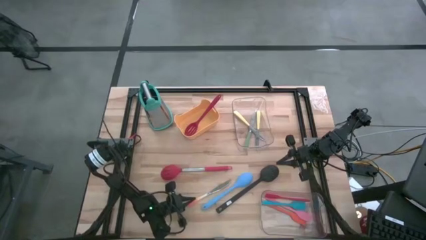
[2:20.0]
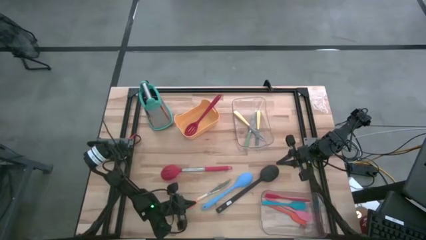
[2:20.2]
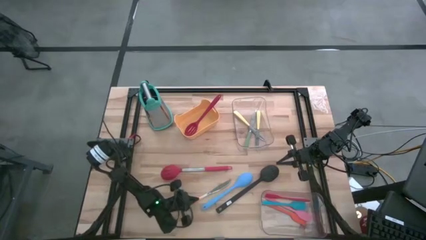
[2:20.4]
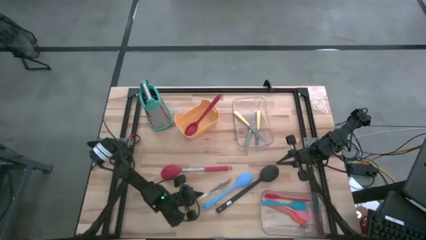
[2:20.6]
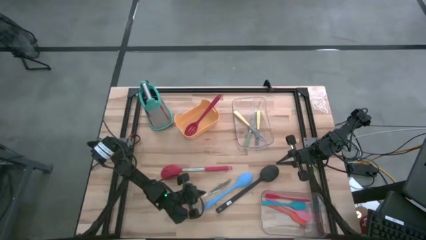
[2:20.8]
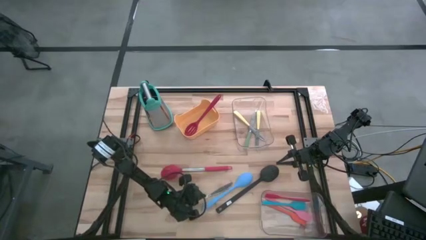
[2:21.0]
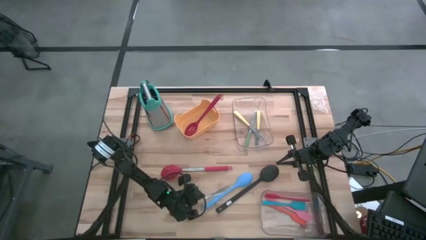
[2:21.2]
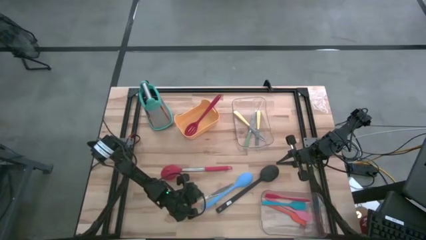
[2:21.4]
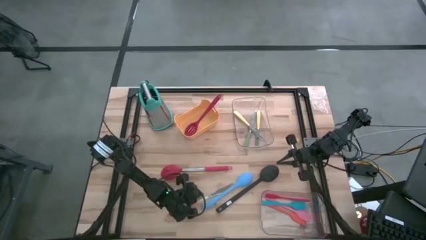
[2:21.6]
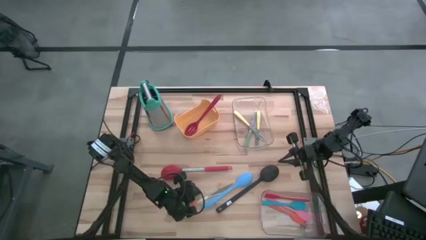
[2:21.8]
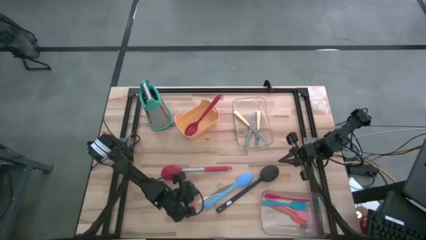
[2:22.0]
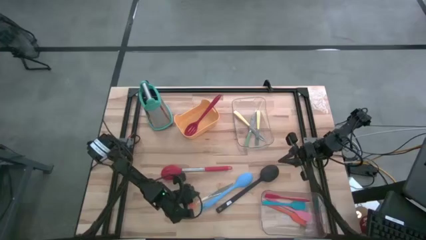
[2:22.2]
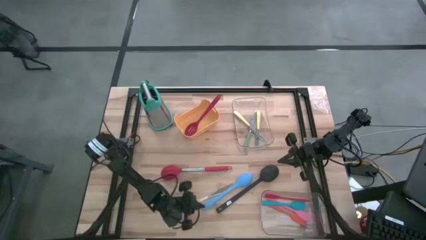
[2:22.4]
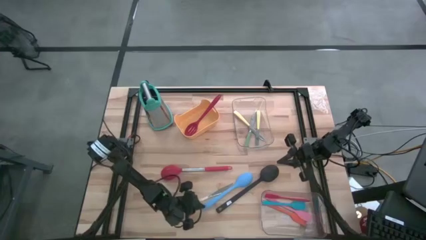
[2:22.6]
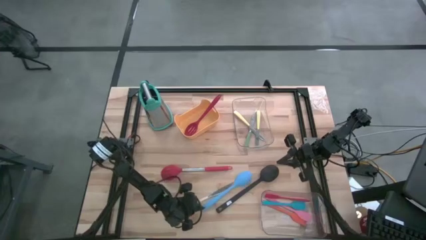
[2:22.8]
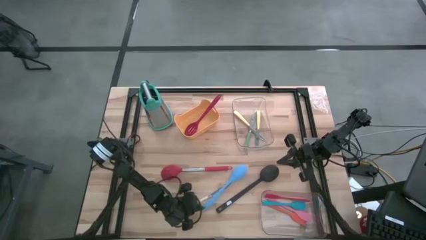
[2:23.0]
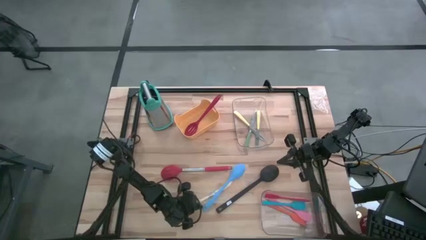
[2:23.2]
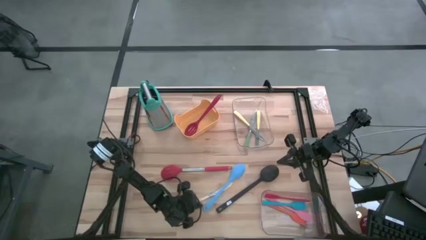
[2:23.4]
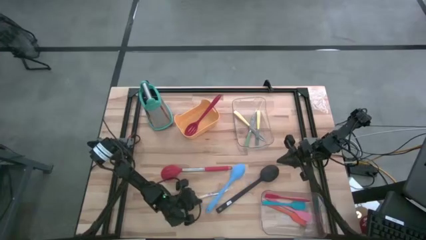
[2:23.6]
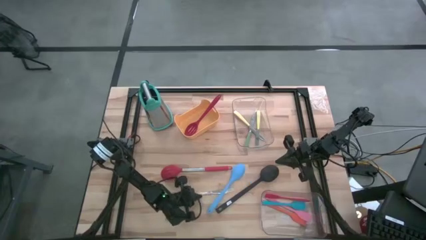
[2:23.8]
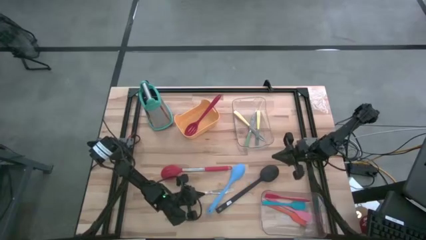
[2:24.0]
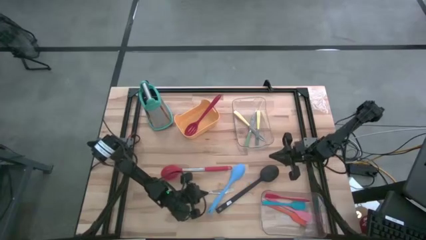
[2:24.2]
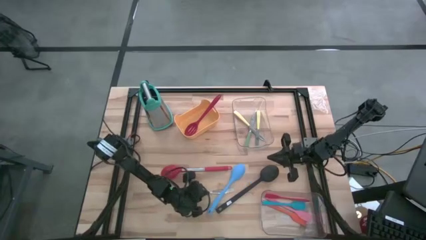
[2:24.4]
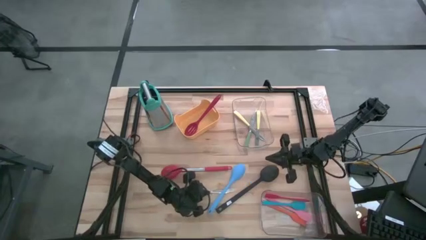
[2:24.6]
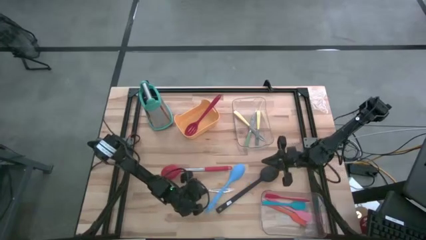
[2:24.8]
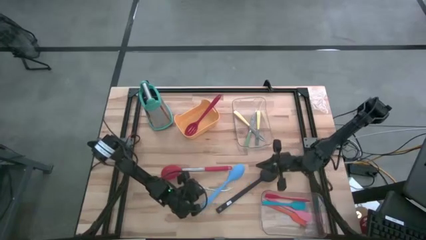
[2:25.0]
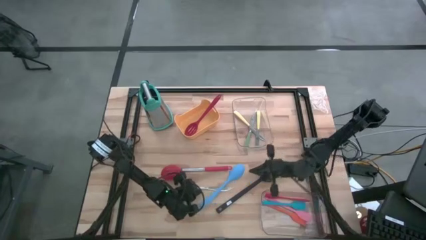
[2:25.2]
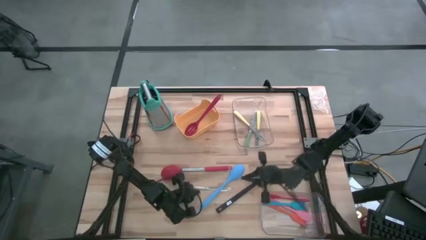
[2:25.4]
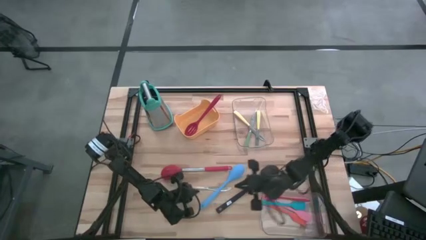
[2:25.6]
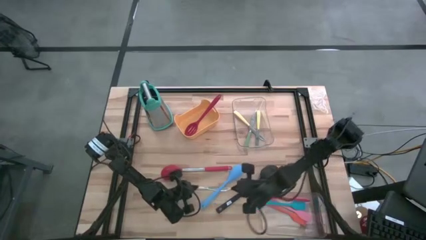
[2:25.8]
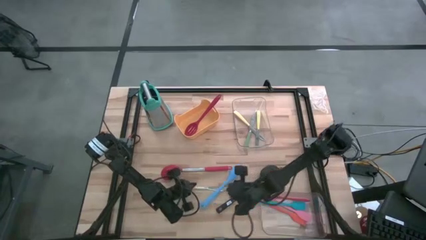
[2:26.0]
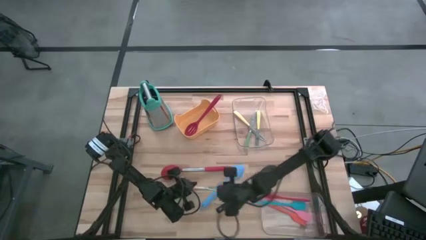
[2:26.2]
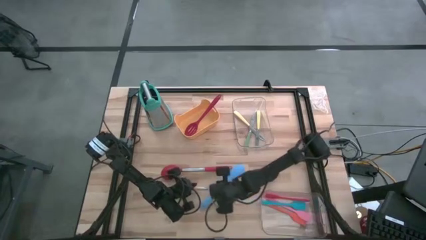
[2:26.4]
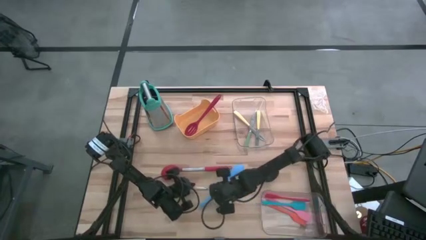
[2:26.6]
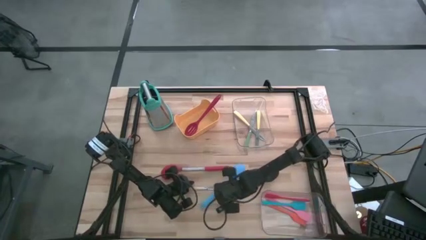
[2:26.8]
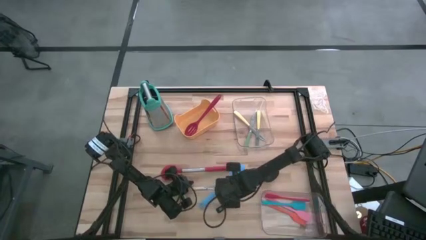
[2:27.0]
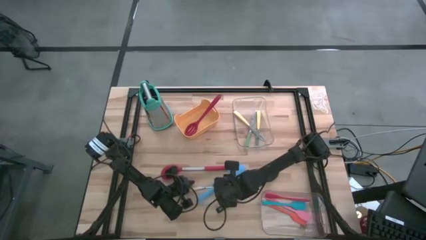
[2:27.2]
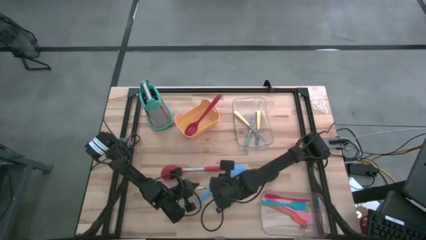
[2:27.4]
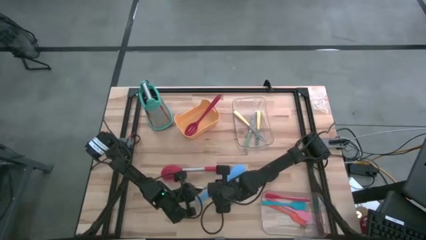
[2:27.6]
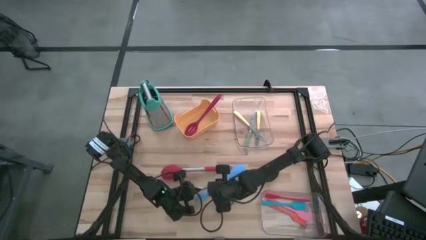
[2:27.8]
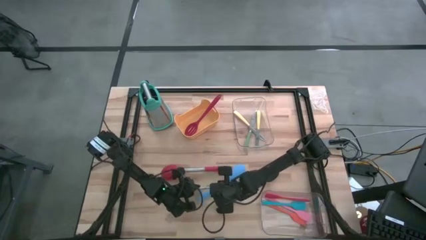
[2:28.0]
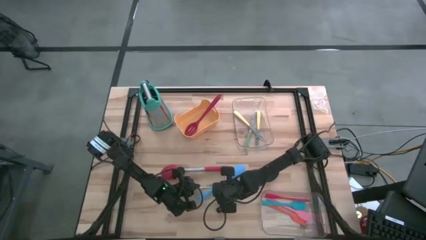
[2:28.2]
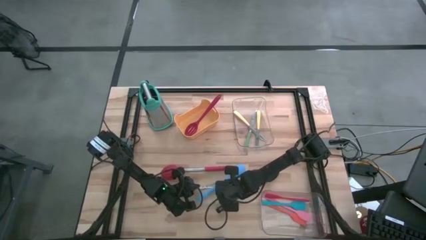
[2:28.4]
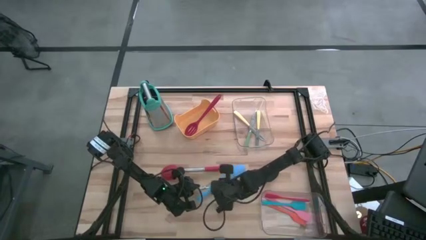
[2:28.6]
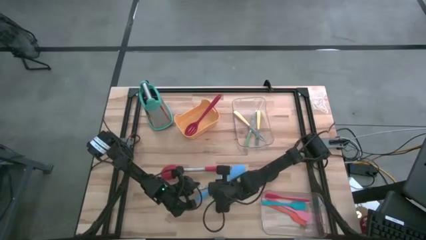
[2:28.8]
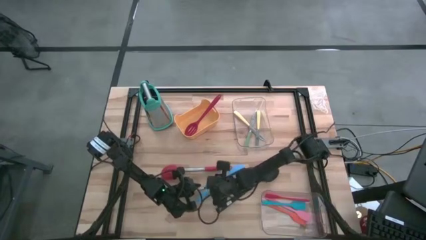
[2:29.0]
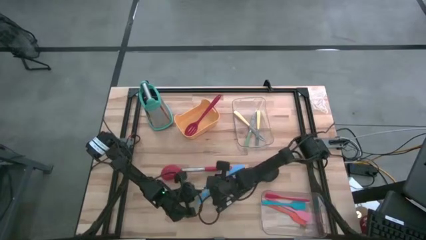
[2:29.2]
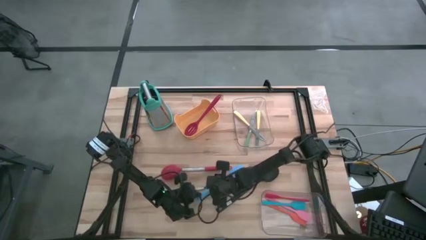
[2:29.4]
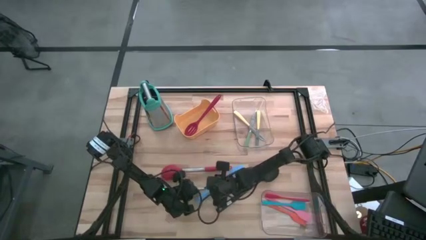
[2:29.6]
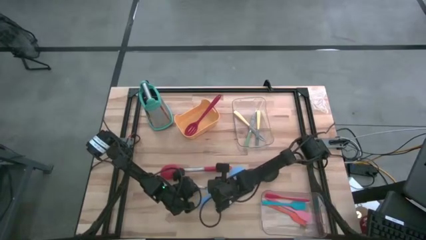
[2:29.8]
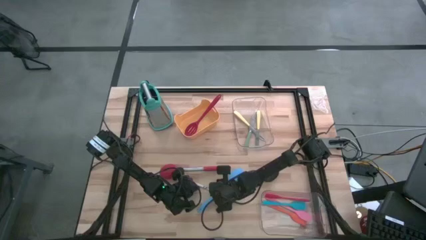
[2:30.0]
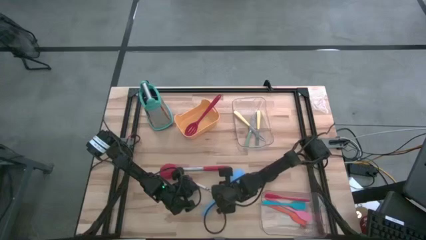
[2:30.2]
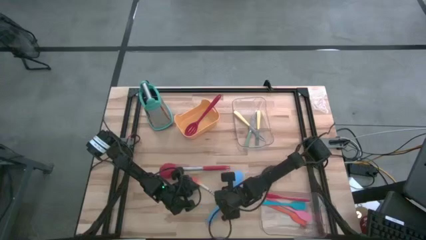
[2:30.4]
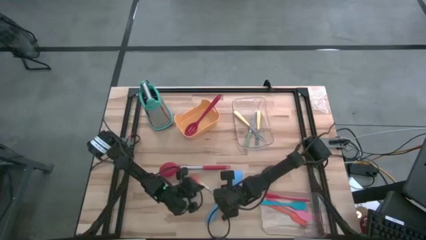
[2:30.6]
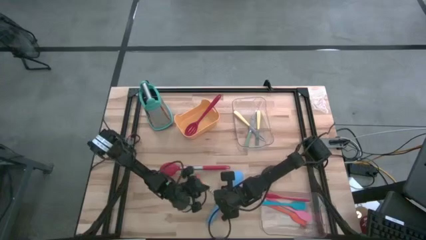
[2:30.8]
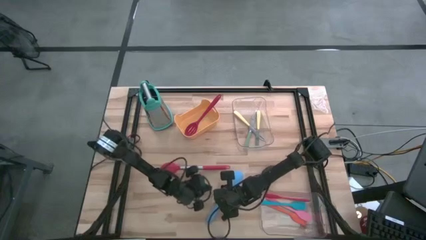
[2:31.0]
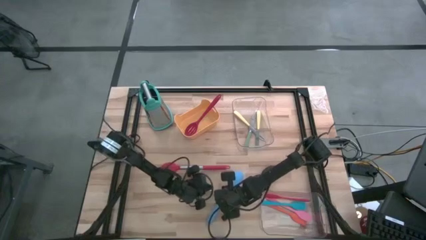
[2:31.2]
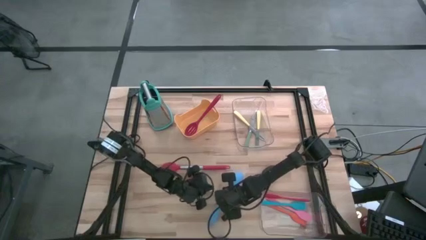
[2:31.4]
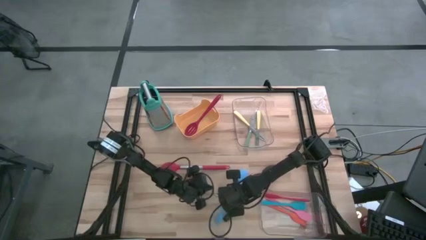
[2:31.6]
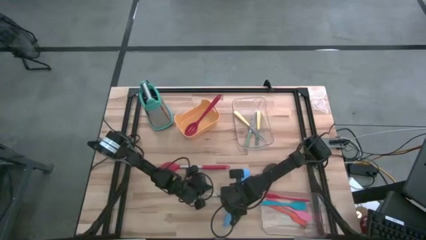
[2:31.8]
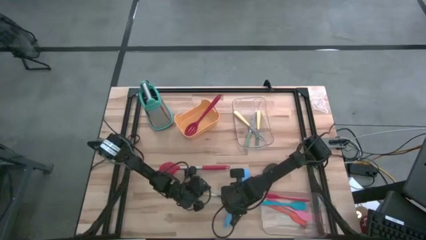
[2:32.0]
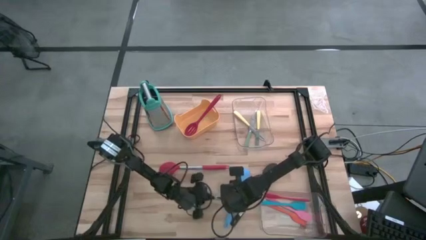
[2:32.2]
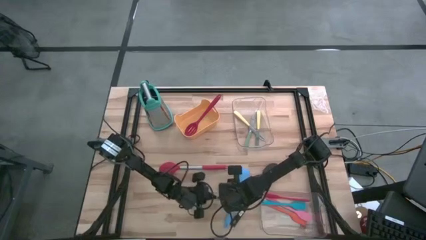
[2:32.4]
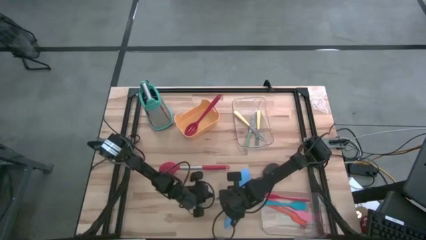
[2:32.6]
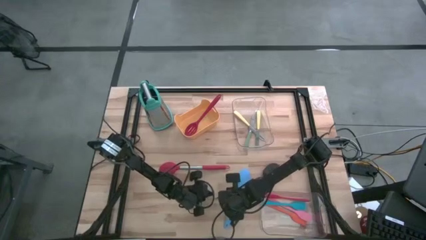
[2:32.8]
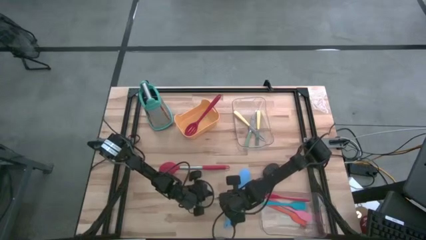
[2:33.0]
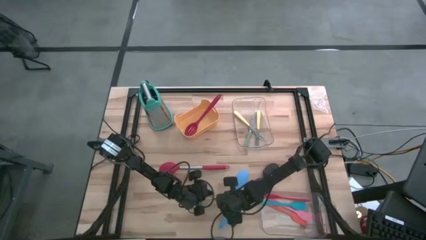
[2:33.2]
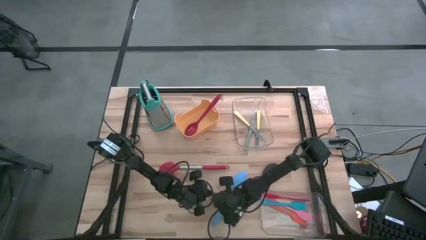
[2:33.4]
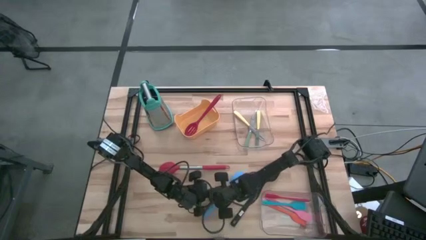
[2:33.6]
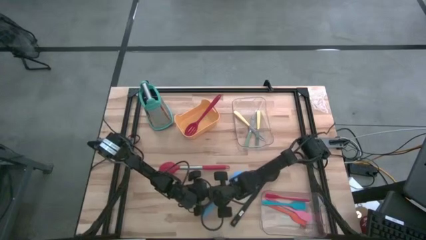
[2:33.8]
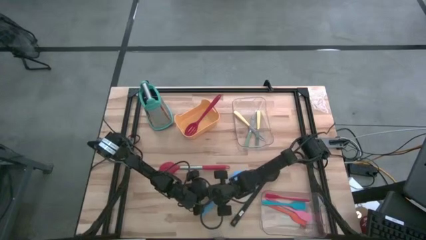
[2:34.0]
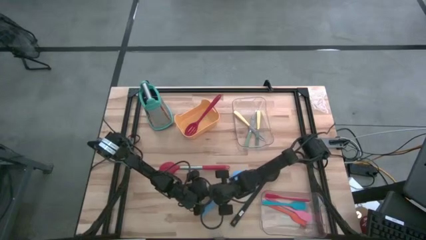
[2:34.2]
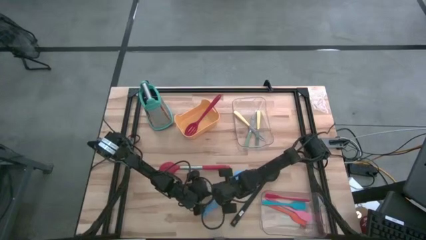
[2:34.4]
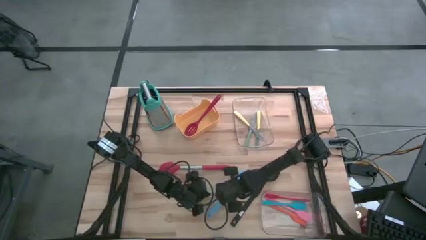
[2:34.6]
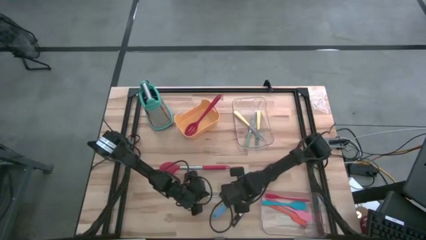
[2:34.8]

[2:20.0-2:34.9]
Task: Pick & Place Kitchen Items
Put the orange kitchen knife into the top transparent bin

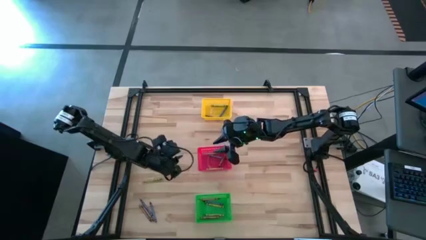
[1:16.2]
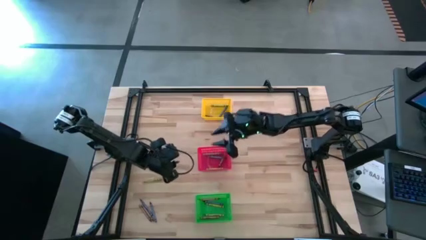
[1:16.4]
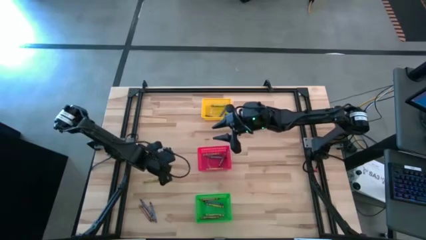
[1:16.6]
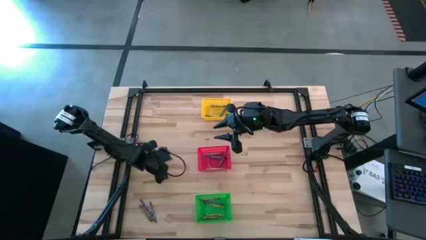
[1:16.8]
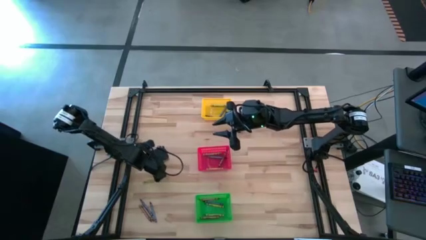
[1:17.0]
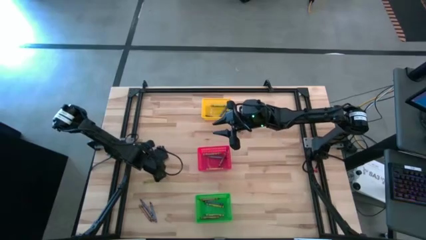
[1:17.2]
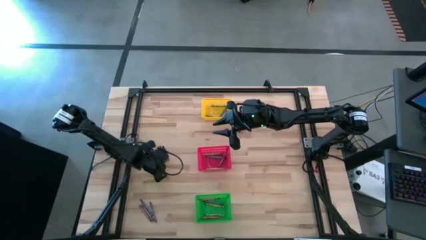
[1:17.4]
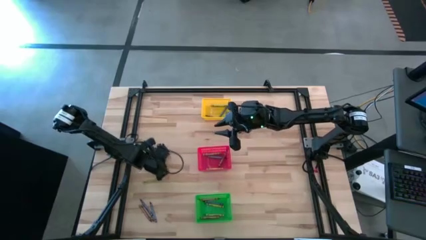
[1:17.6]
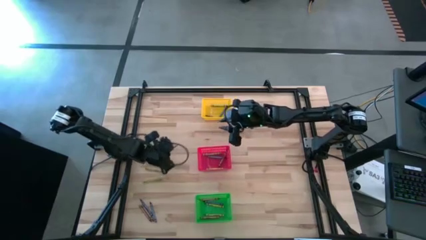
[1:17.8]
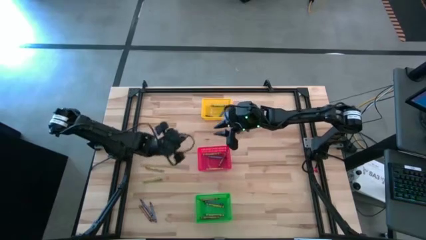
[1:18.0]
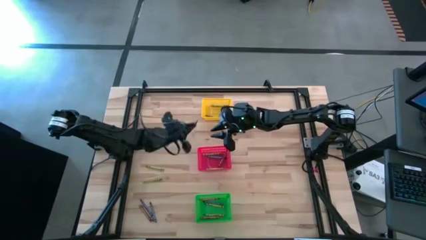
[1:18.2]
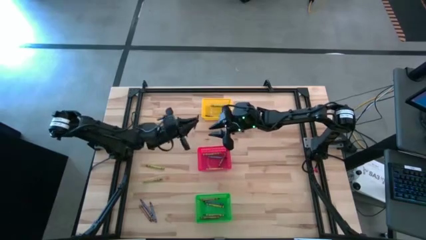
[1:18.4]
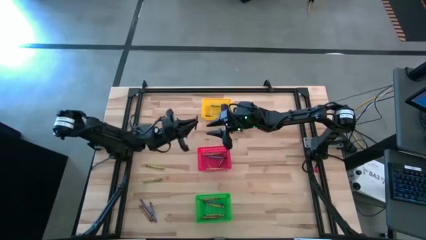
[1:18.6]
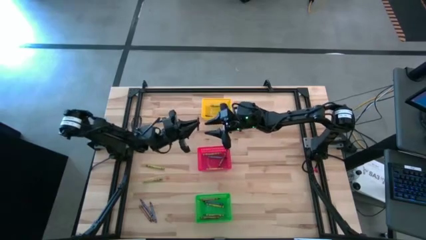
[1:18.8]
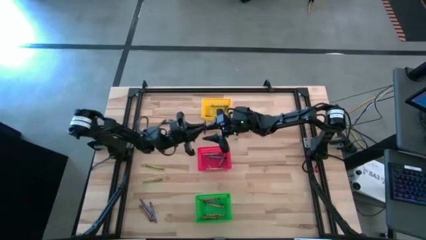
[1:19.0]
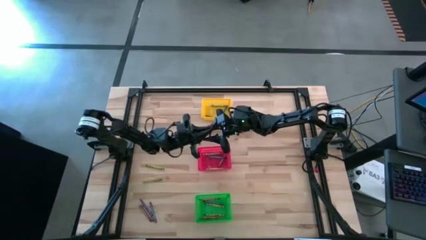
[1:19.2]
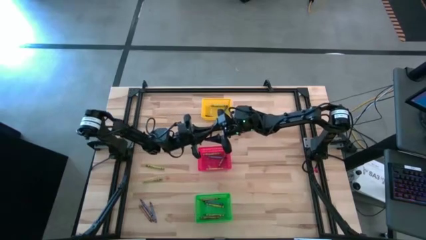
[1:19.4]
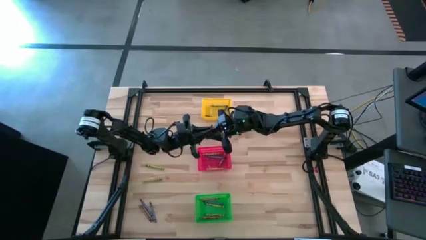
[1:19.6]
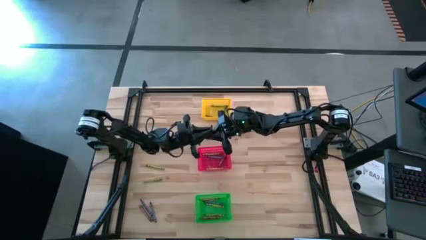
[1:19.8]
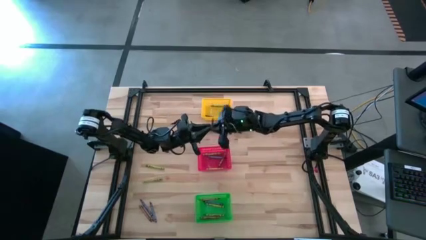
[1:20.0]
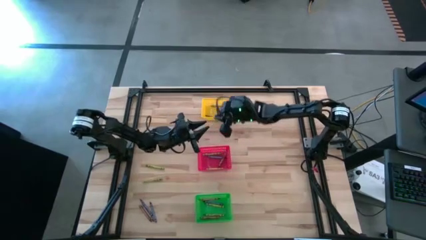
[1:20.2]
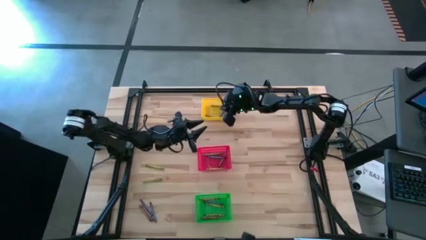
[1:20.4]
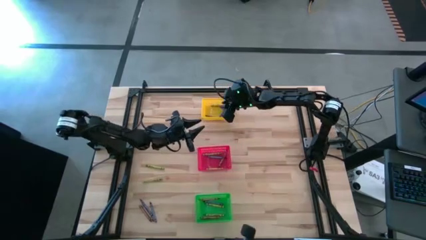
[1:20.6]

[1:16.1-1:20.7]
Task: Sort crayons
Put the brown crayon into the yellow bin
